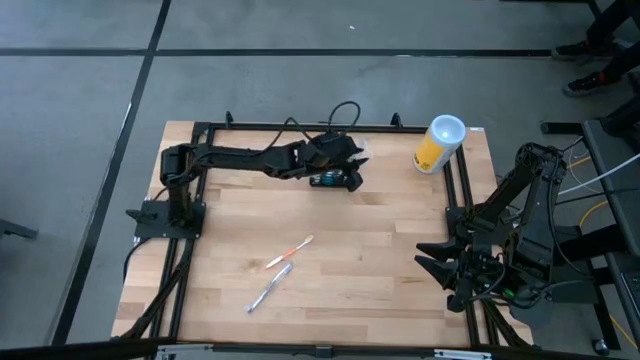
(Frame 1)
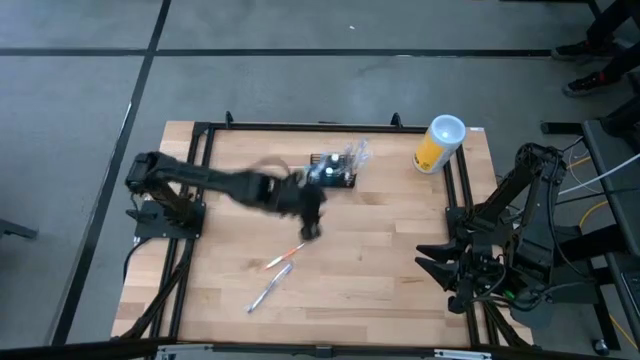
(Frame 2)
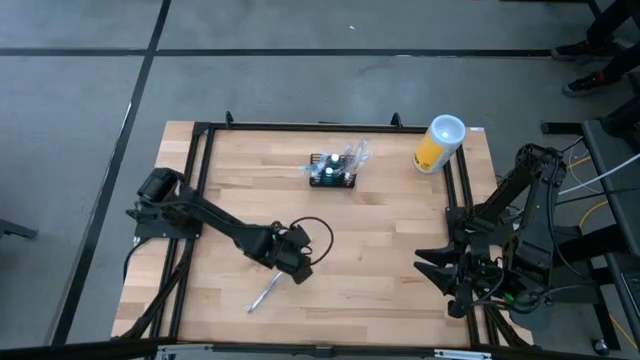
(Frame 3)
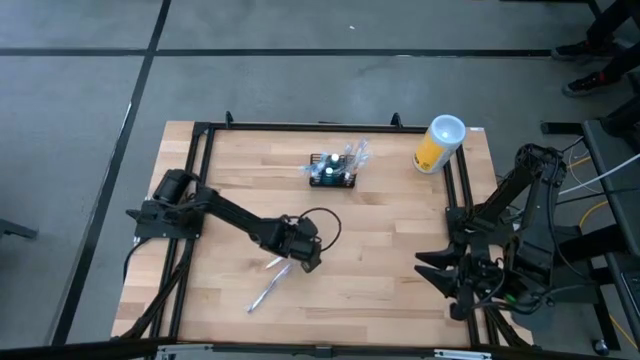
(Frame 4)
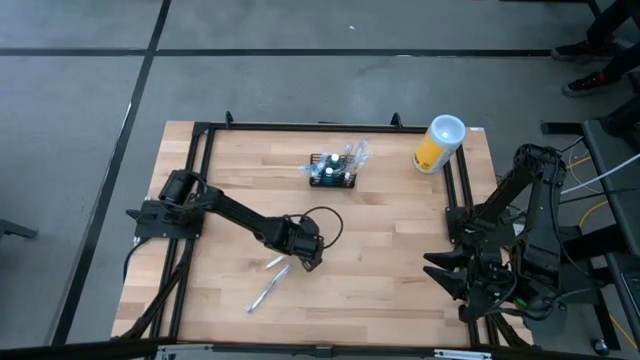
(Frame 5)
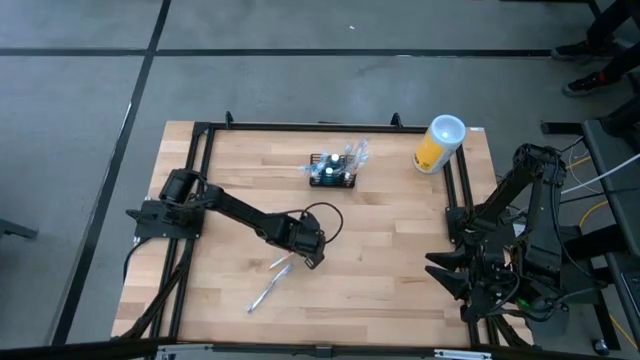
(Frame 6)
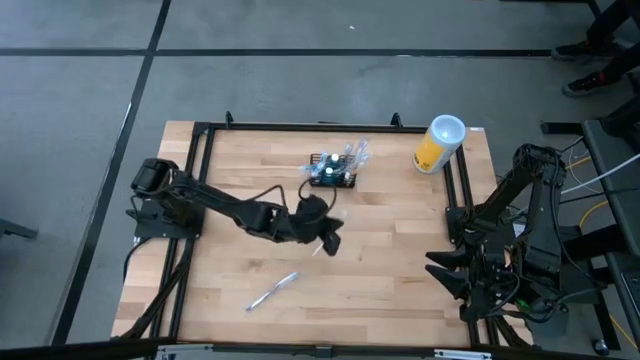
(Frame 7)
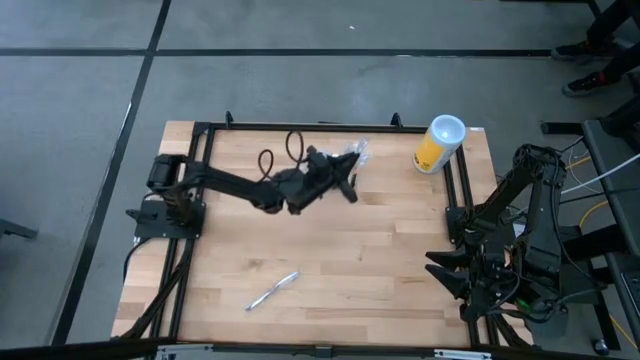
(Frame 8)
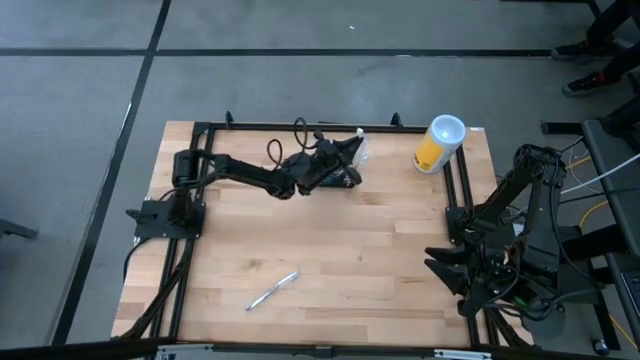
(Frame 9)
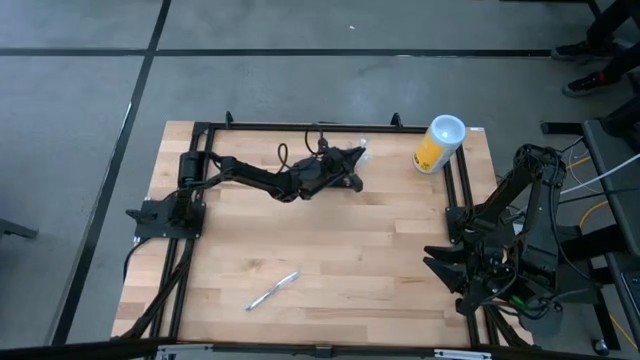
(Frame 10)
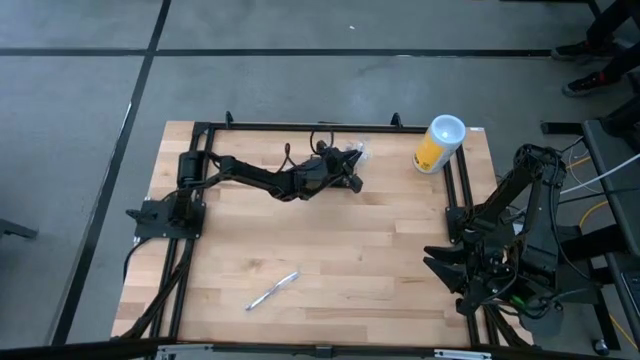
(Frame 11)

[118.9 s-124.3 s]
Task: Pick & Place toothbrushing station
Put the orange toothbrush into the black mesh organizer

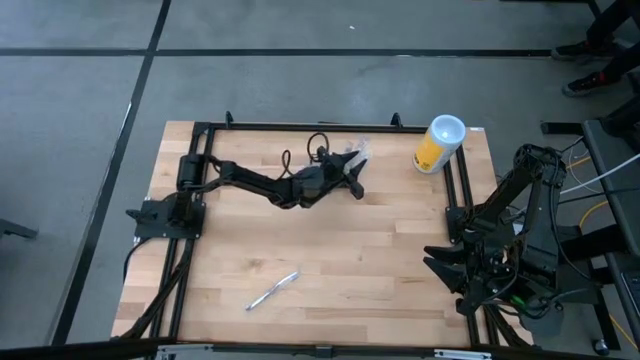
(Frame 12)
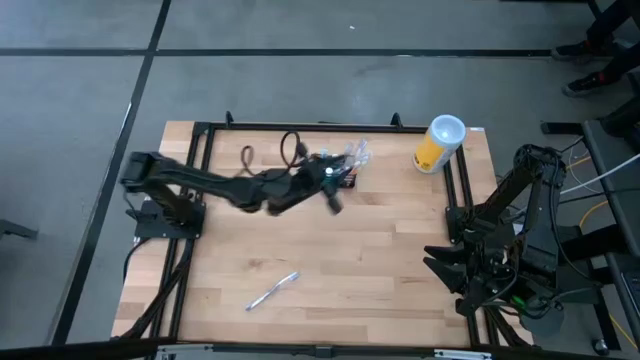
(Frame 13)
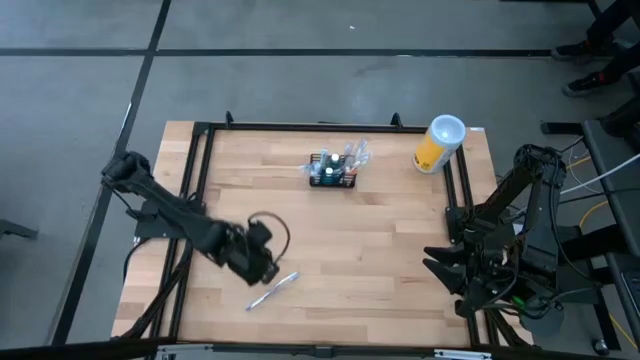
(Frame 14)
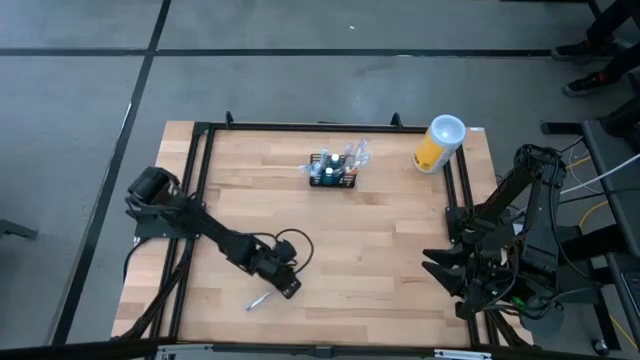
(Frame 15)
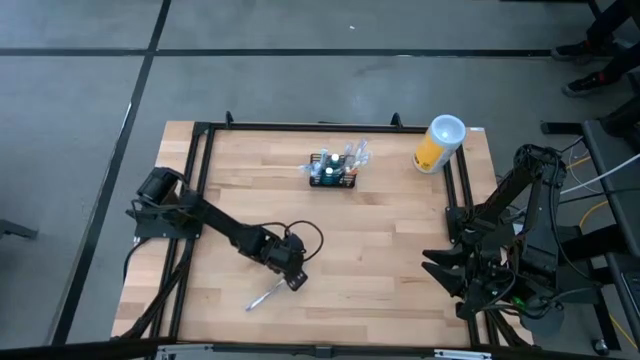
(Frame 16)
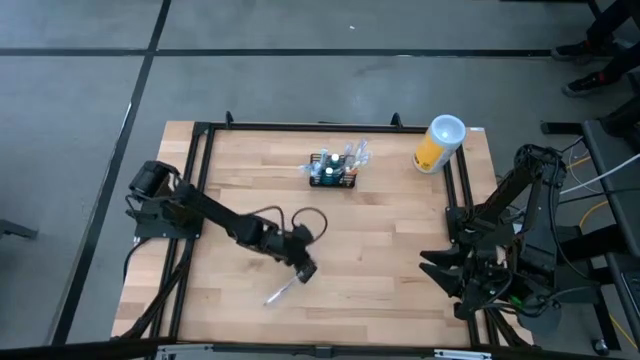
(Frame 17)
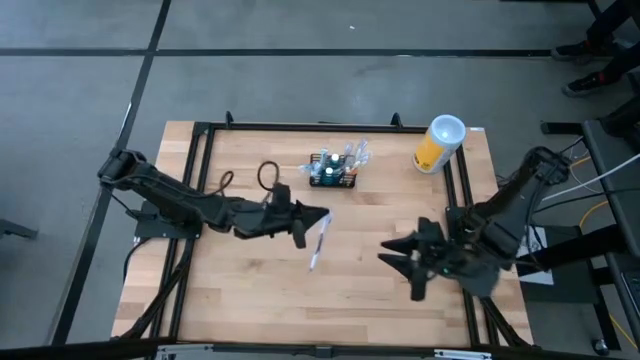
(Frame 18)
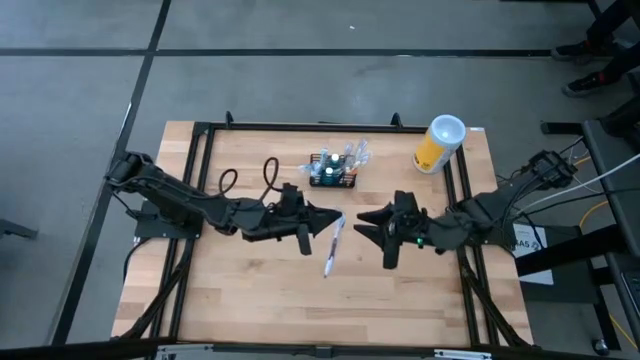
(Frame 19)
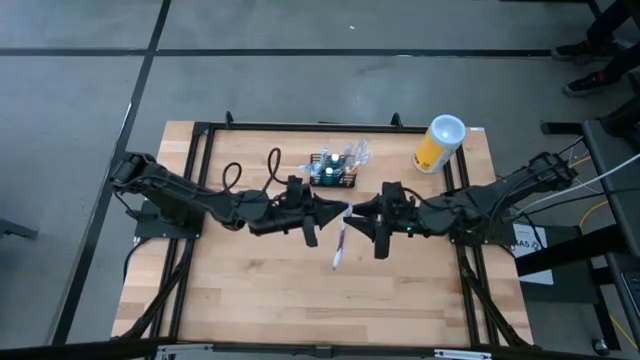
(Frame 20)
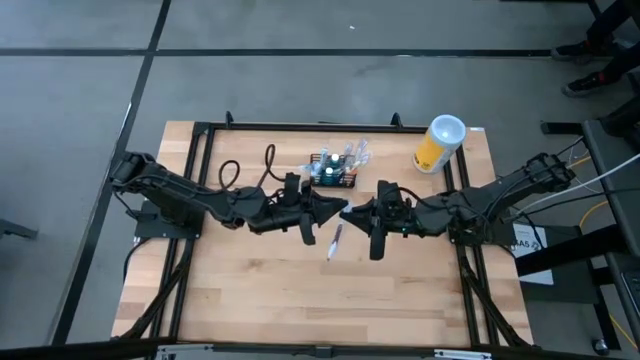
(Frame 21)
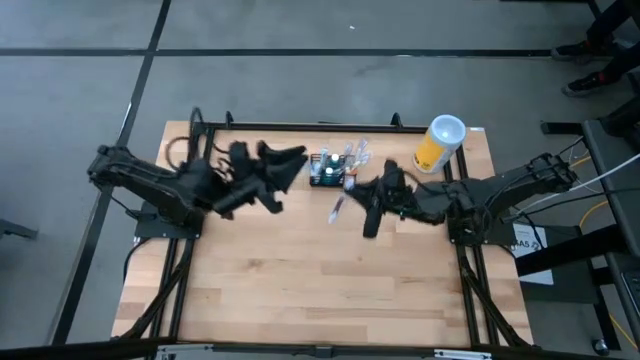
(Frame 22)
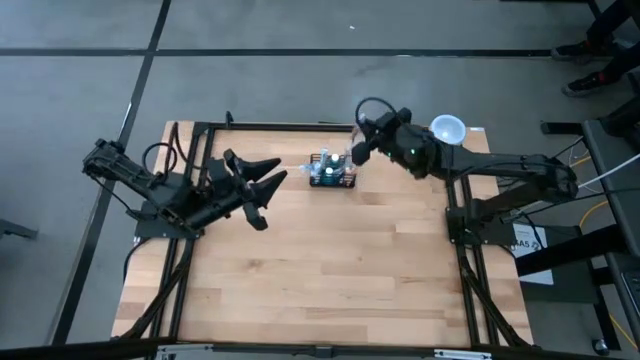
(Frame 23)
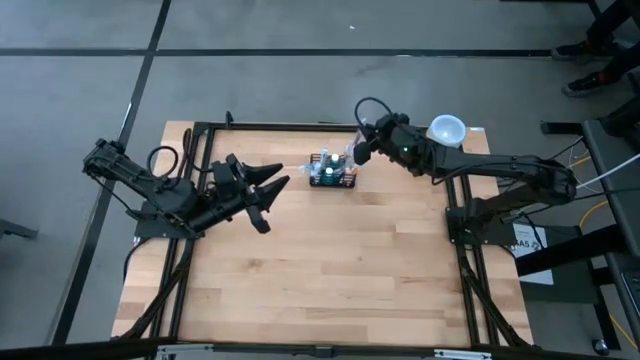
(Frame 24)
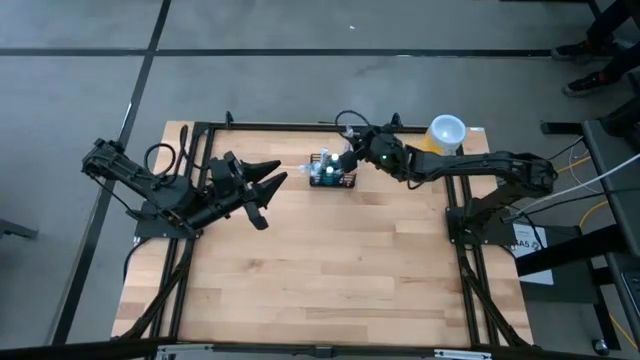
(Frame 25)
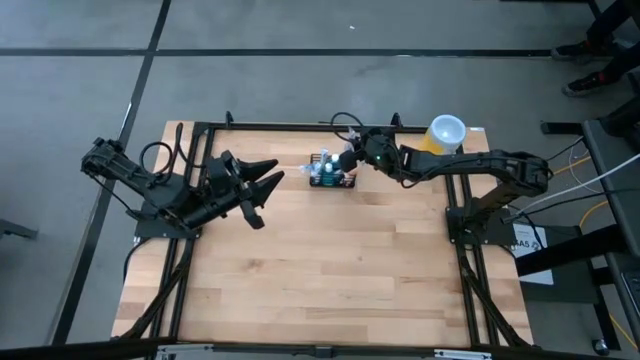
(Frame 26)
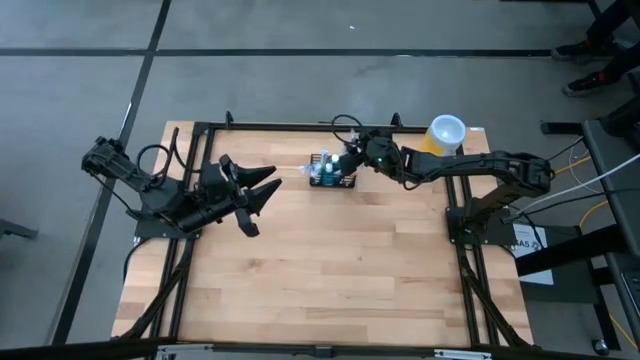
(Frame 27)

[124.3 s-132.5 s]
Put the purple toothbrush into the black mesh organizer

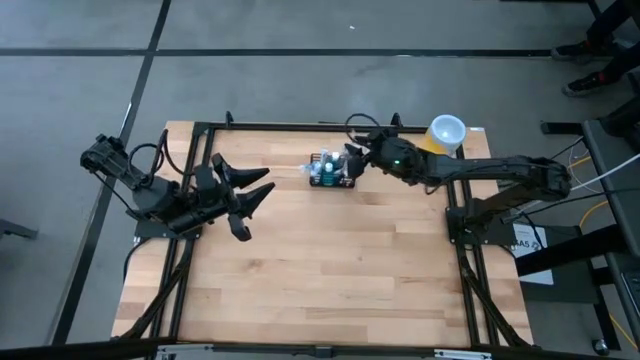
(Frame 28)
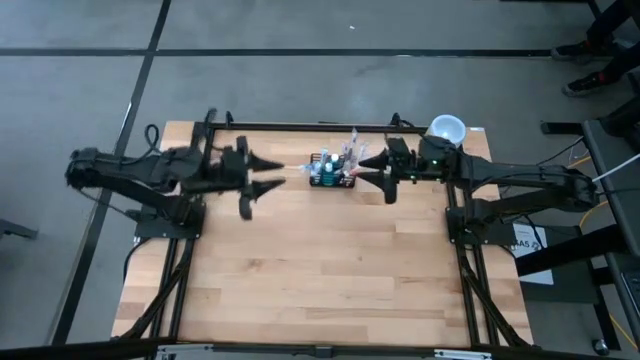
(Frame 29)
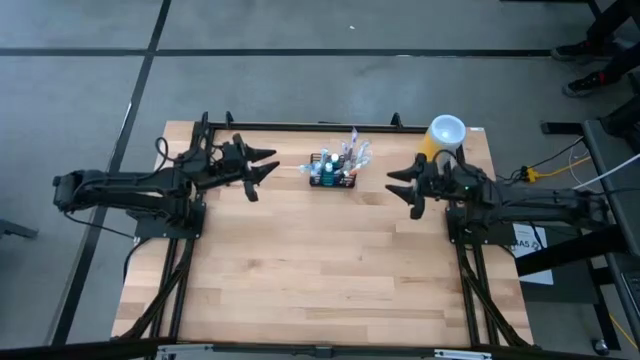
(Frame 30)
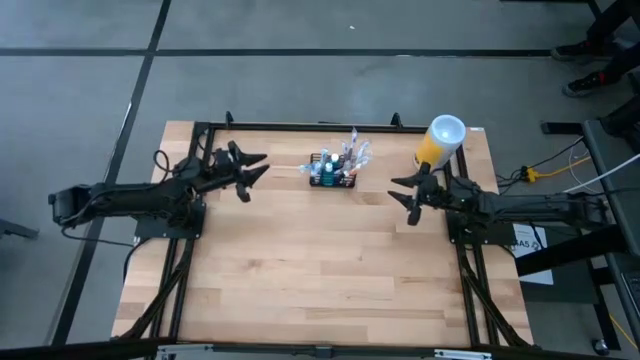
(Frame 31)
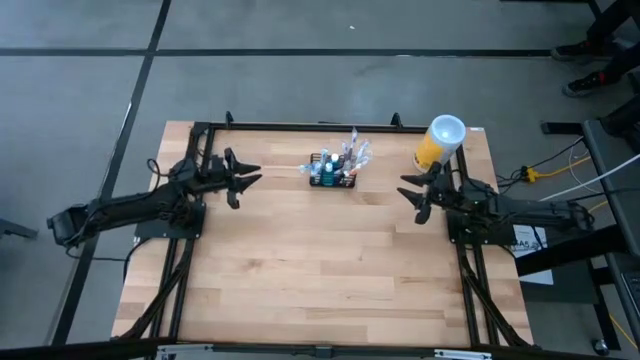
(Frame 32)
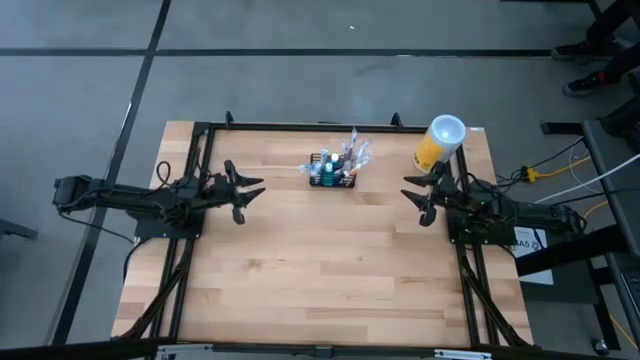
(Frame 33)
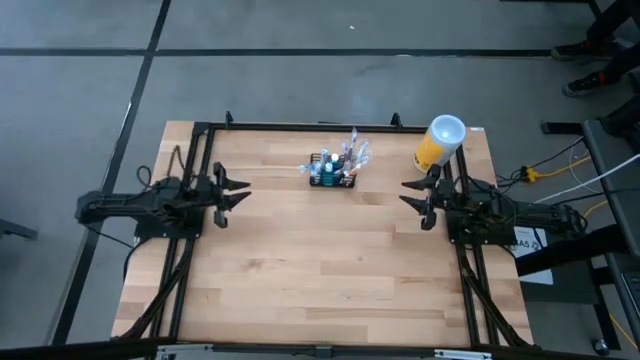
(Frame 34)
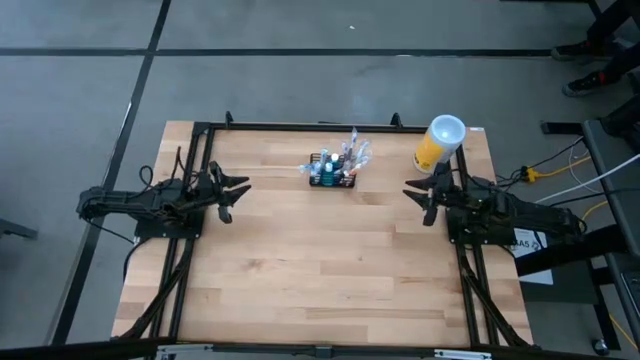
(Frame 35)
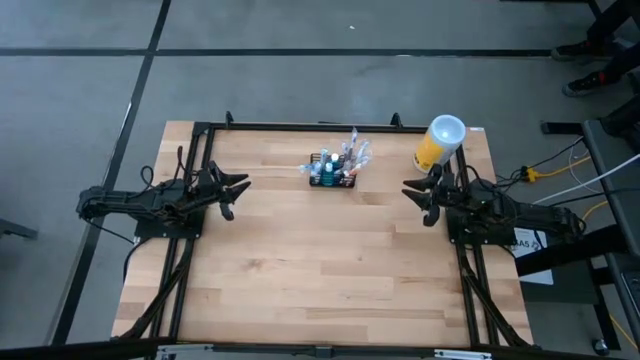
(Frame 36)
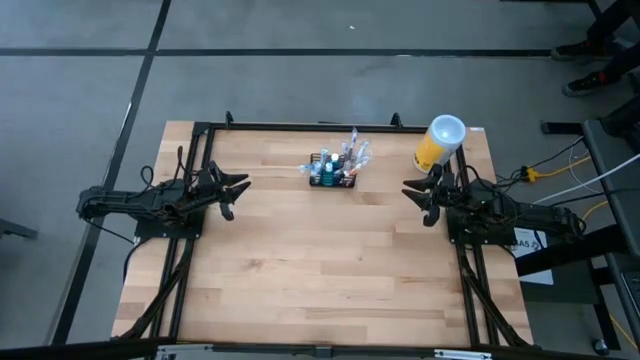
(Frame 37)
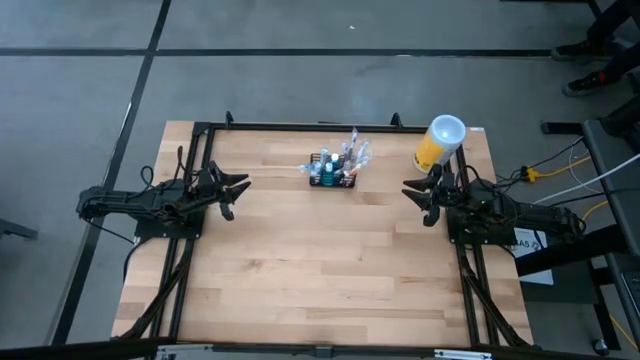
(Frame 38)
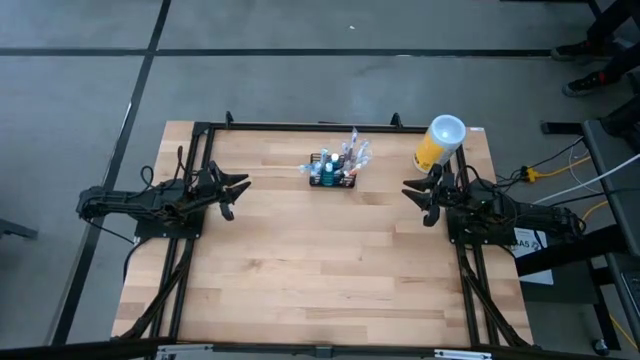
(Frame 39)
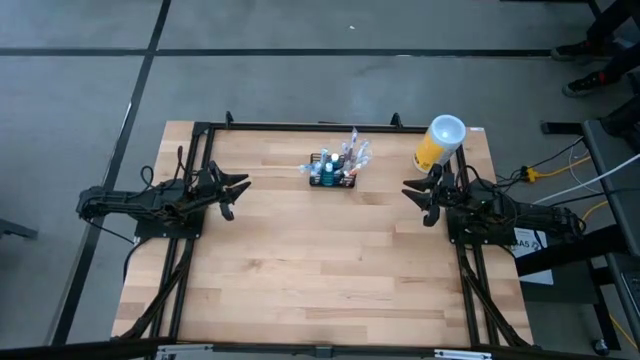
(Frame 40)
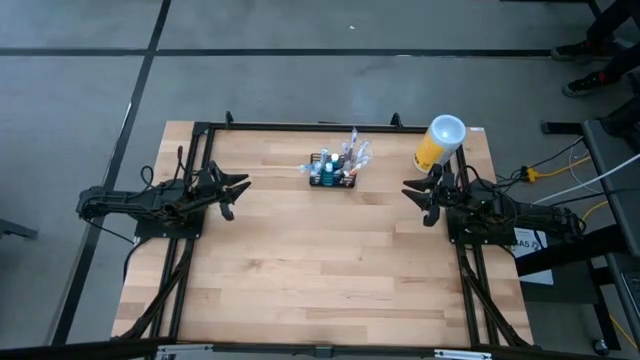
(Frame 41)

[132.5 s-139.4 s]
Return to Home Position

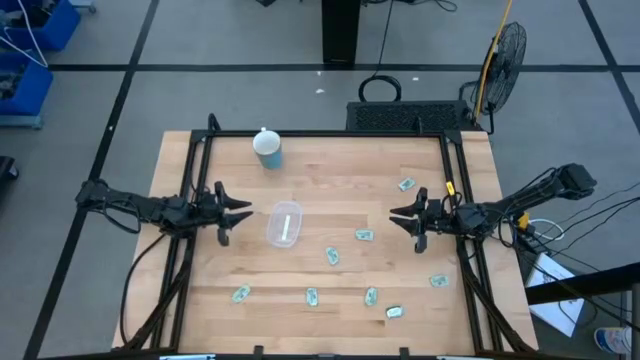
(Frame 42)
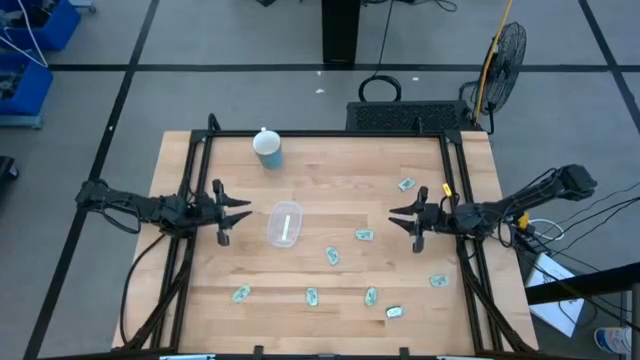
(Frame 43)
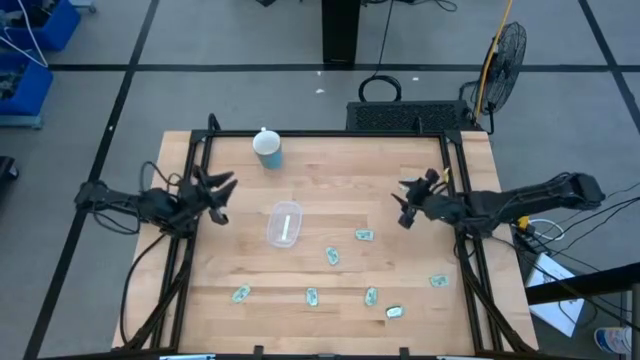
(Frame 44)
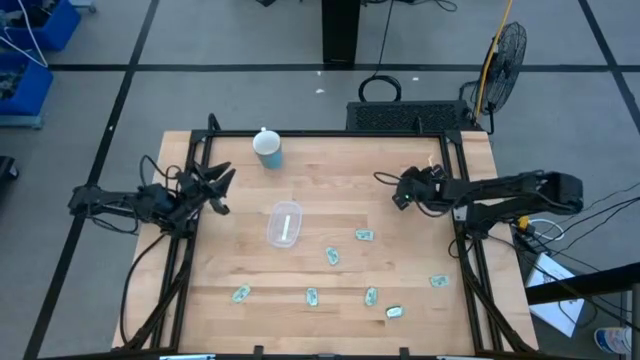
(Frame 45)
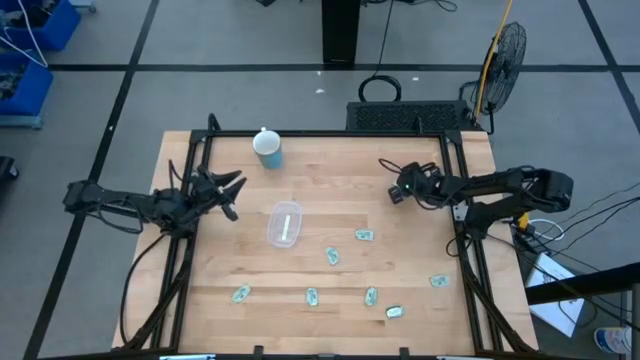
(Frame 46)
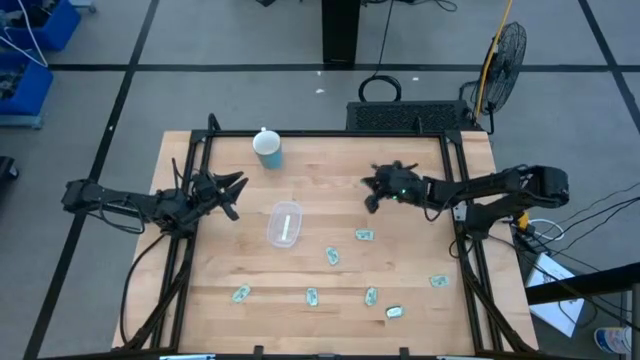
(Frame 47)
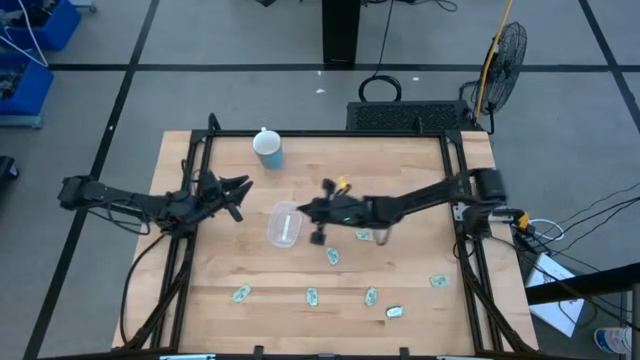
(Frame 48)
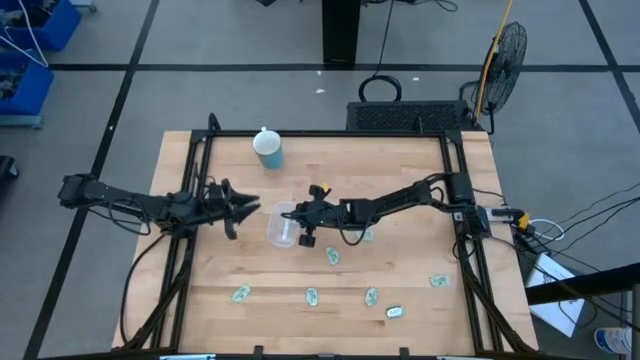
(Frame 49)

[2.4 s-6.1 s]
Task: Pick and place Stevia / Truvia into bins
Put the light green stevia packet into the transparent container
